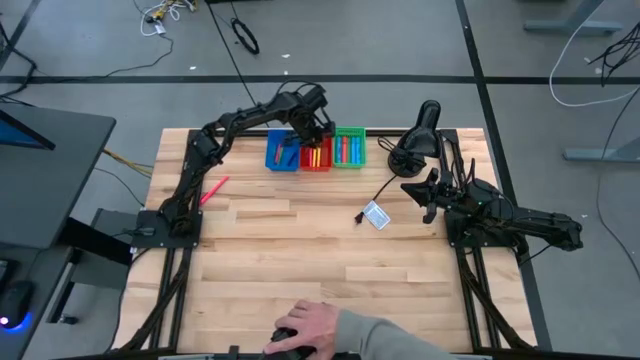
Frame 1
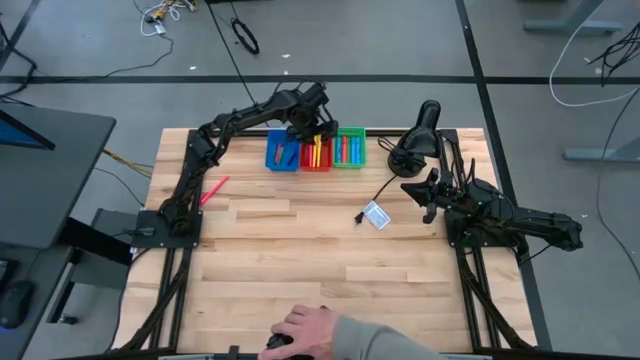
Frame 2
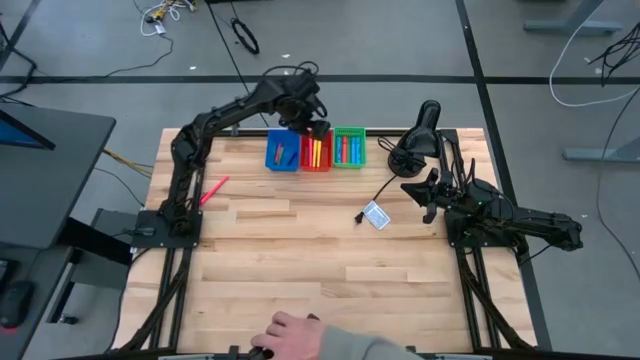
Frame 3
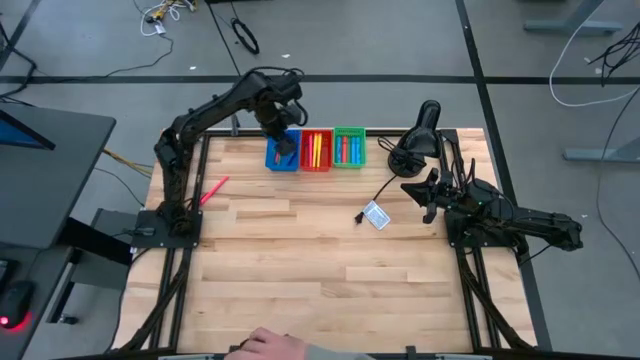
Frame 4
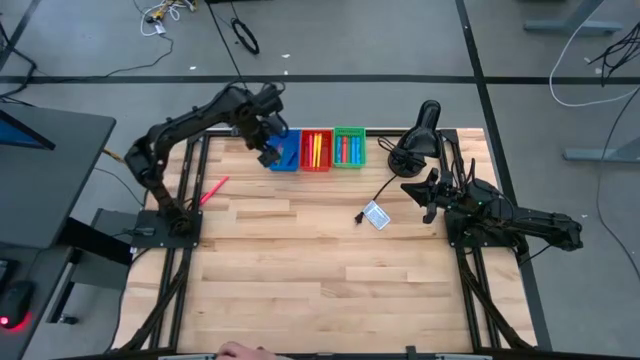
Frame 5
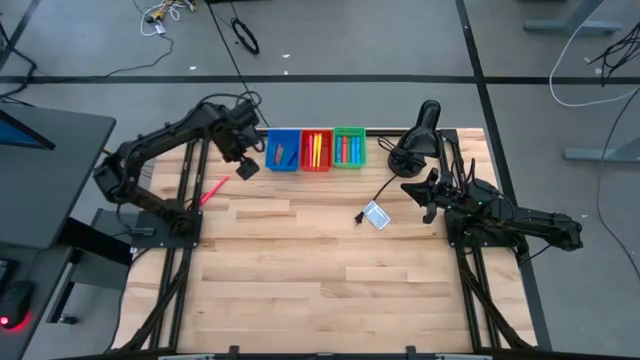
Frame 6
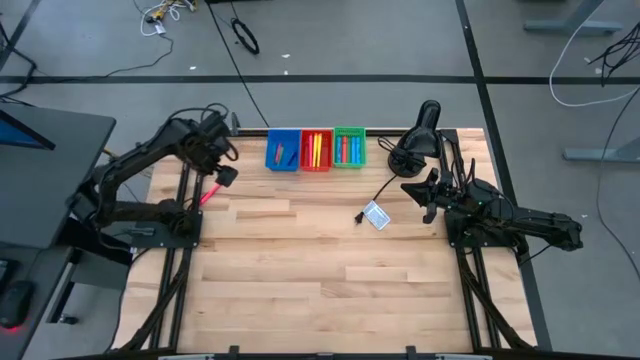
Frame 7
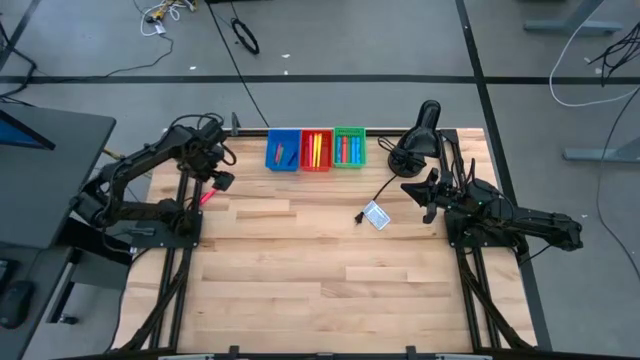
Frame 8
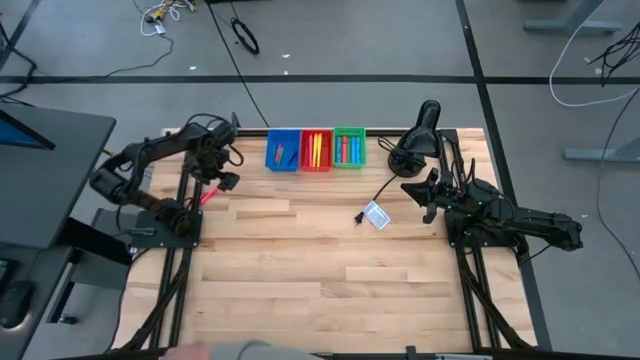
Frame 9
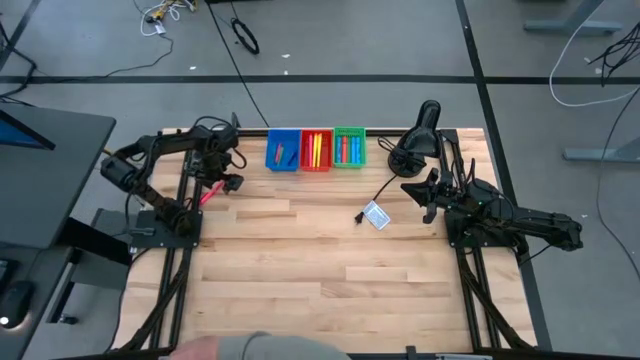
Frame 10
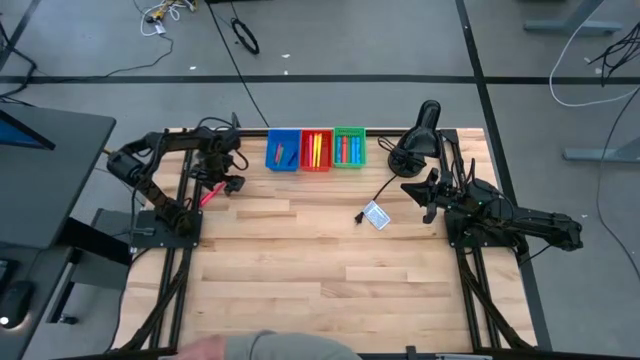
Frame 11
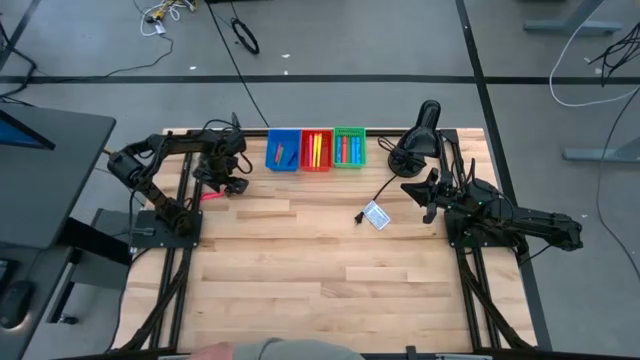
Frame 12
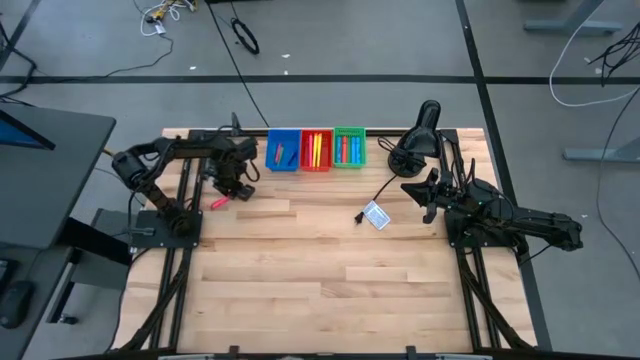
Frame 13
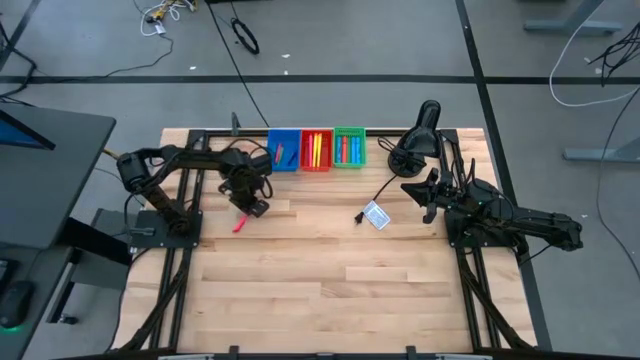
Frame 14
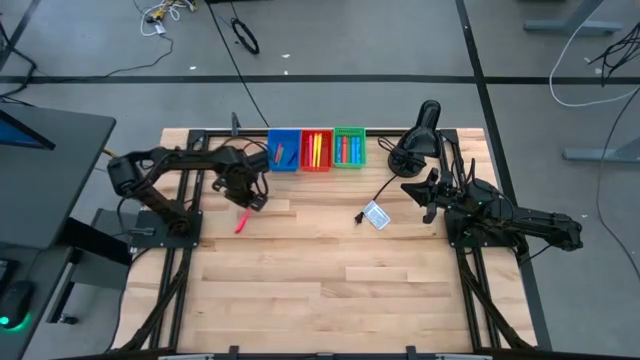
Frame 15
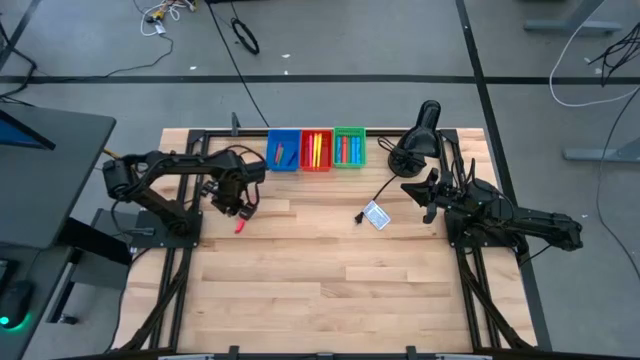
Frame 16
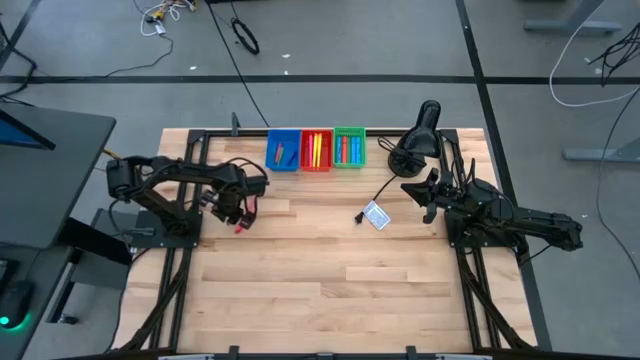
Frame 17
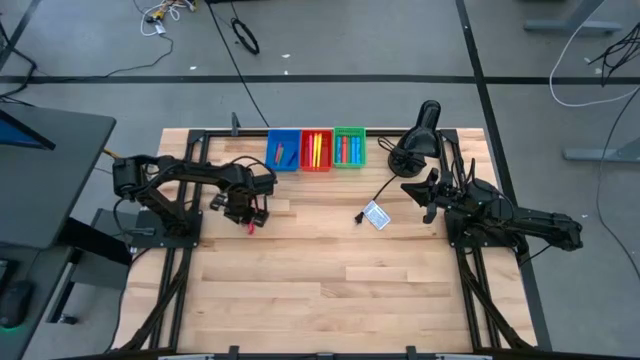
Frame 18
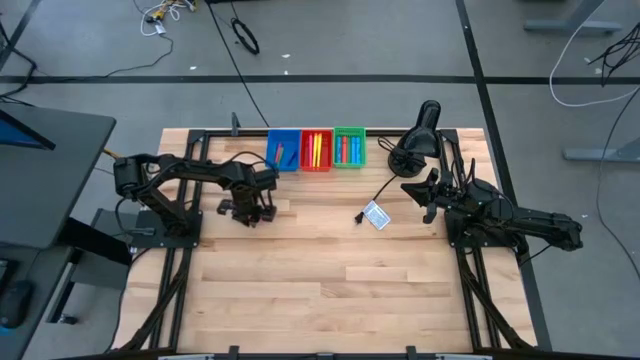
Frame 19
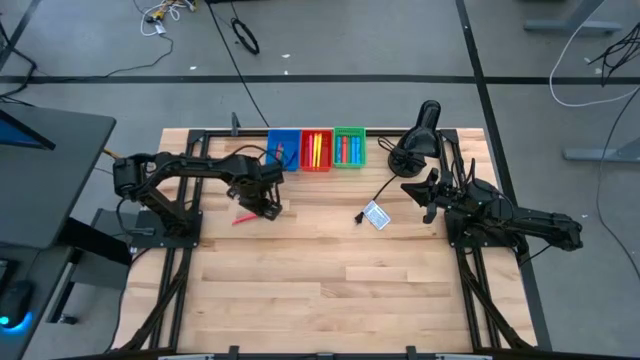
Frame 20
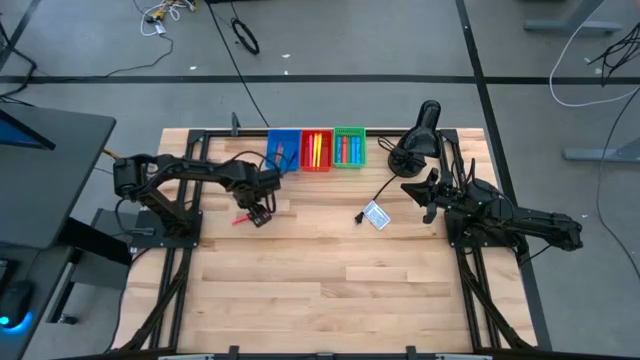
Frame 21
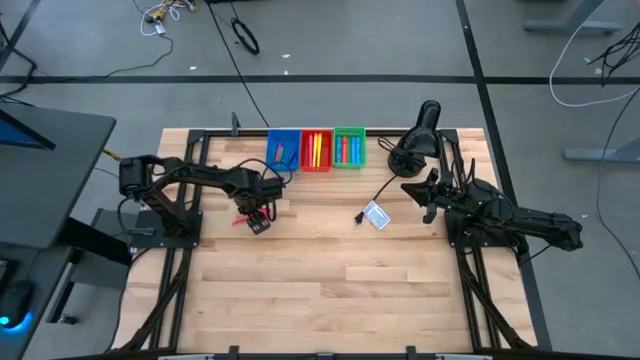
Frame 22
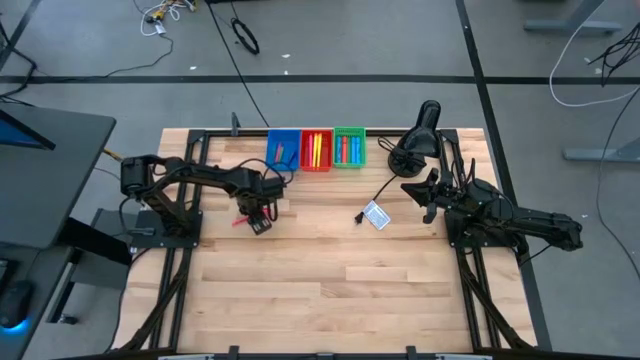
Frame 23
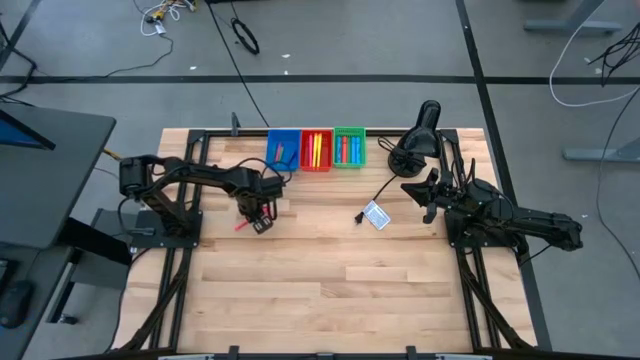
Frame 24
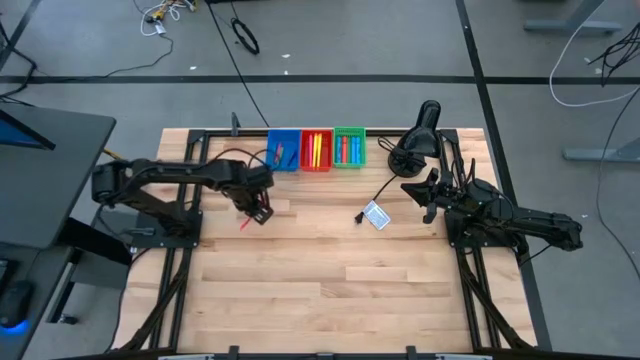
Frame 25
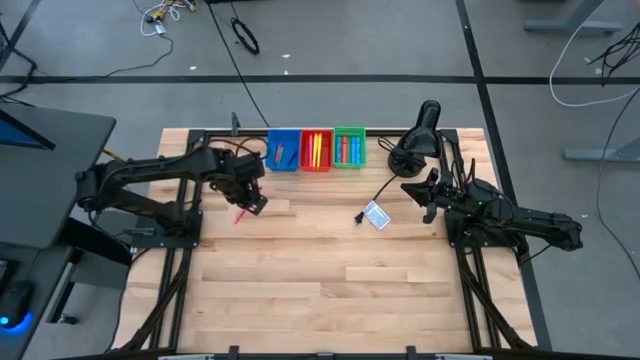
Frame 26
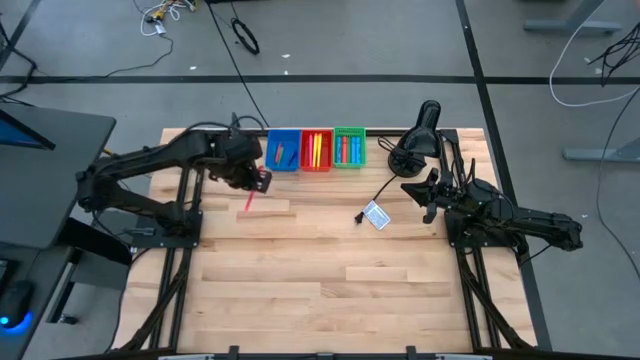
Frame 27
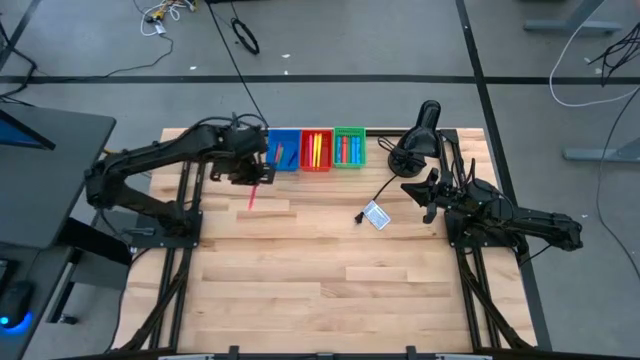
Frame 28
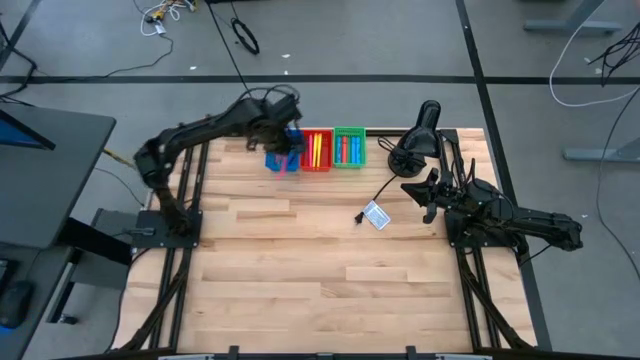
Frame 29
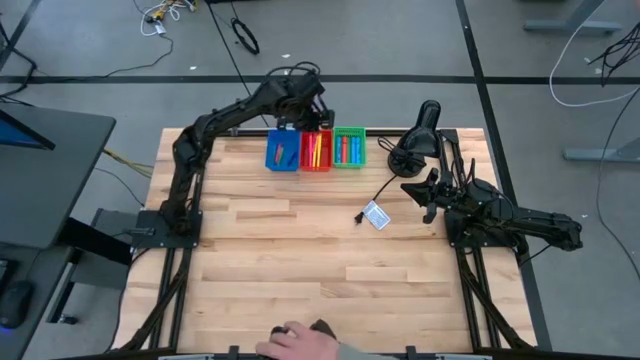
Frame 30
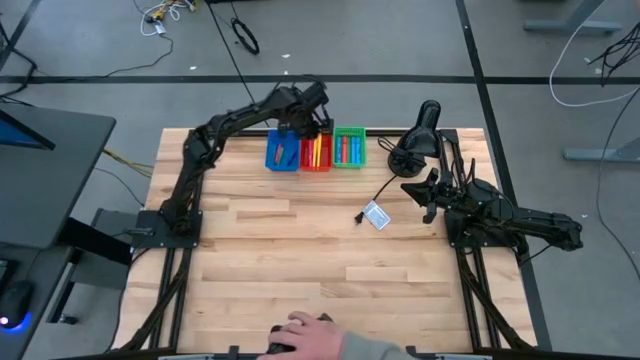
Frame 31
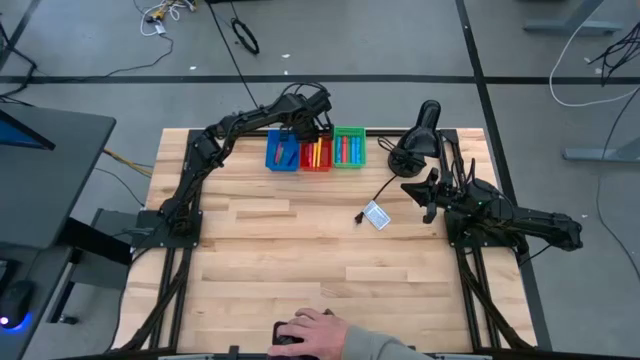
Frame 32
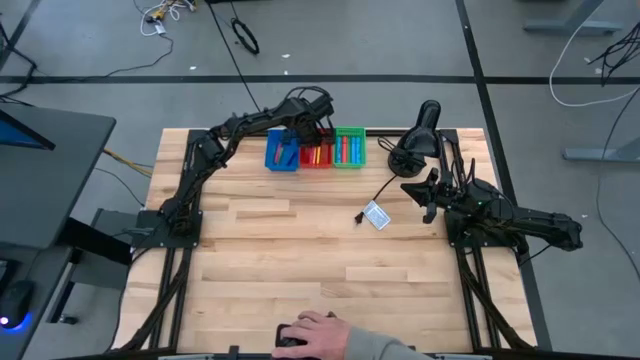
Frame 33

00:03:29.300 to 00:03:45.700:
Task: Pick & Place Markers
Put the pink marker into the red bin

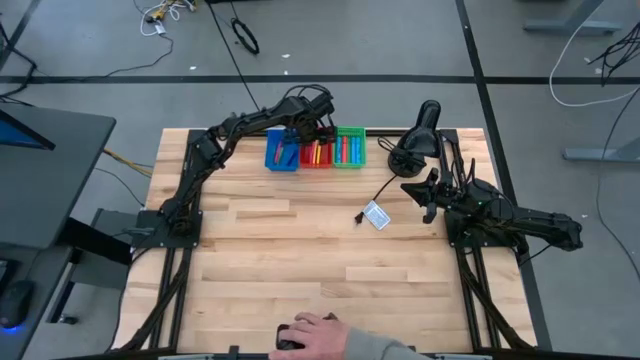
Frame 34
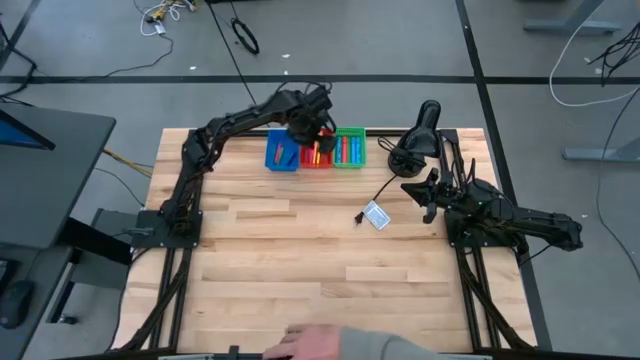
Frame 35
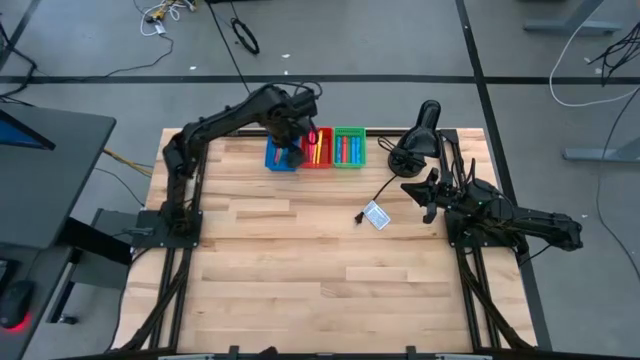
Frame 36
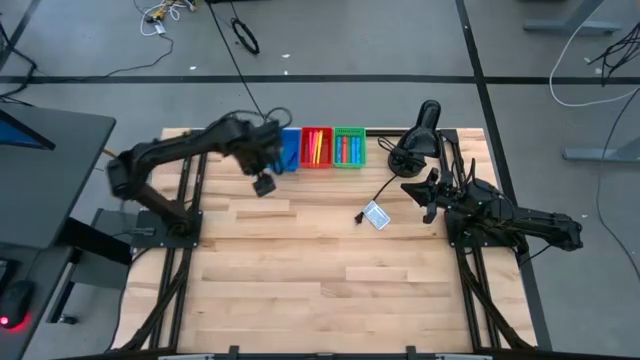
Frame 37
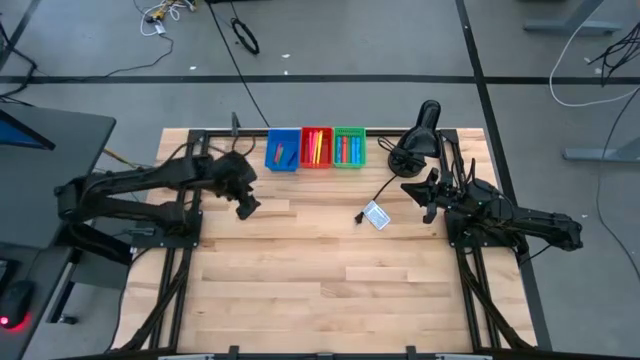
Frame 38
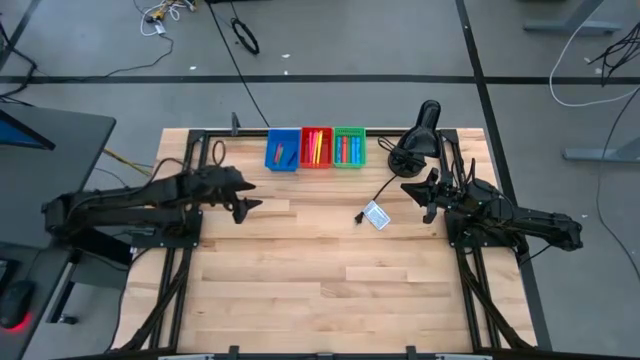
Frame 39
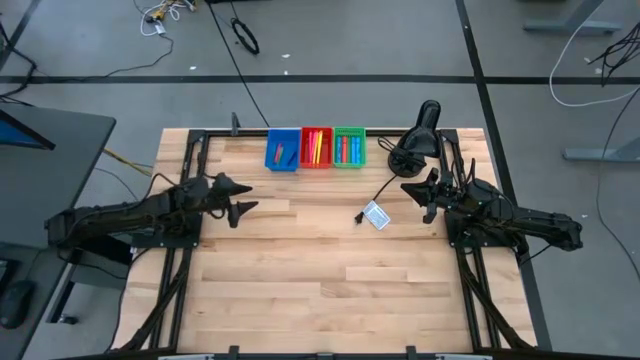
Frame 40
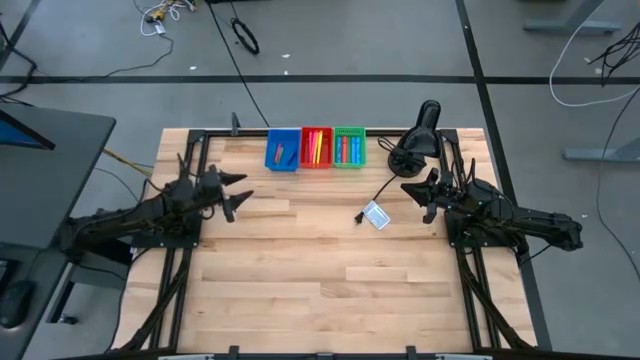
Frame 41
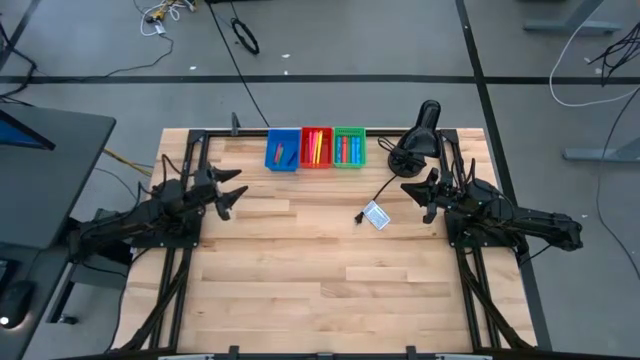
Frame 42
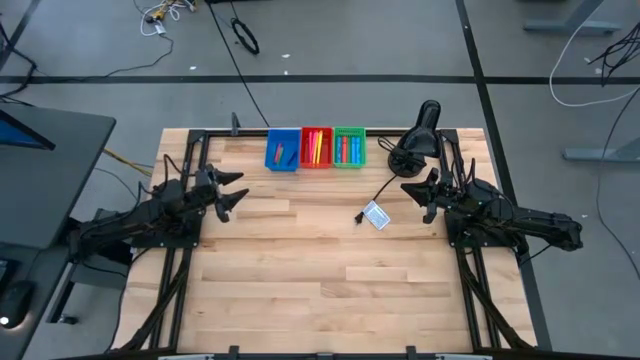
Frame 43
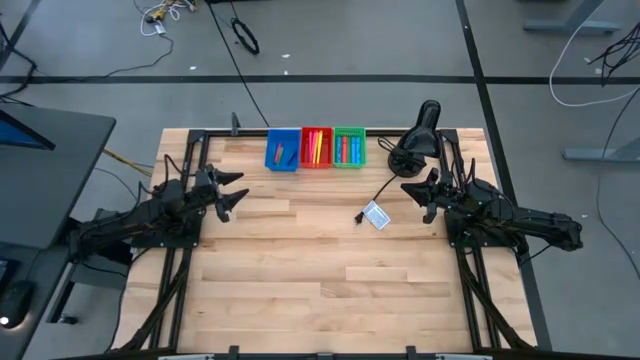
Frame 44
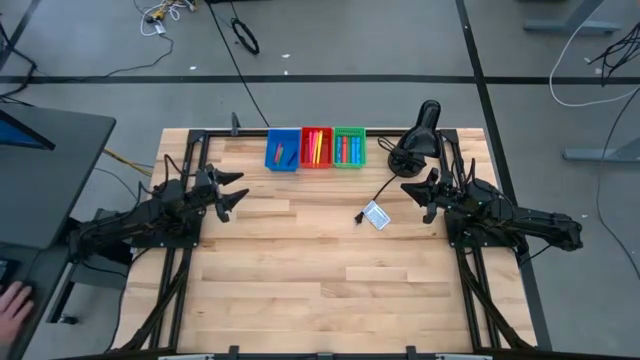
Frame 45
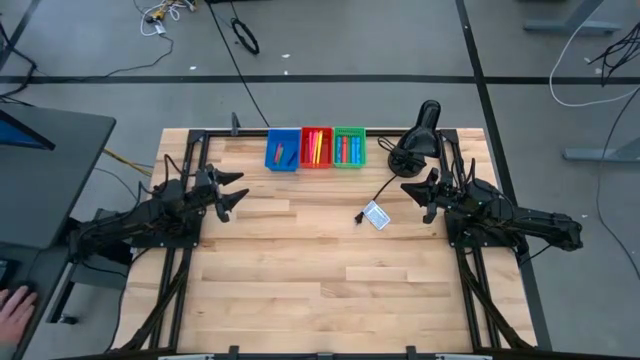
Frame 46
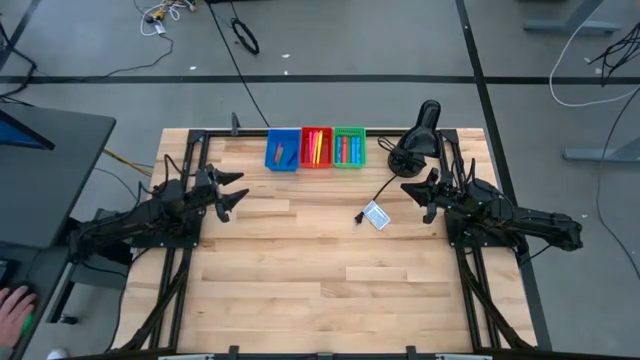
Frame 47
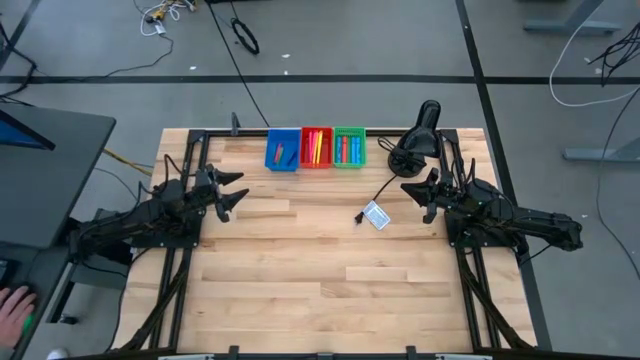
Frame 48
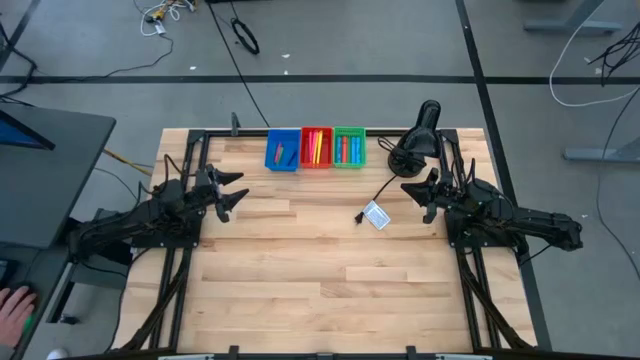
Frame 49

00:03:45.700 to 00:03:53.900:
Return to Home Position
